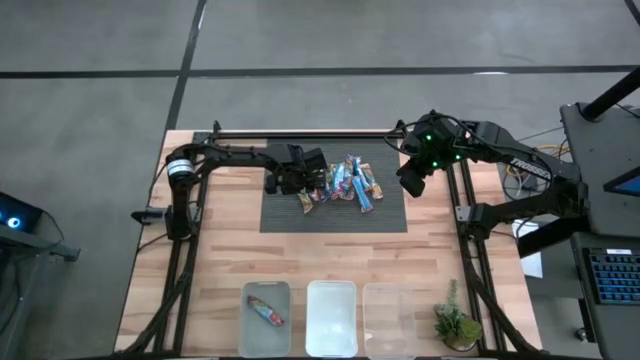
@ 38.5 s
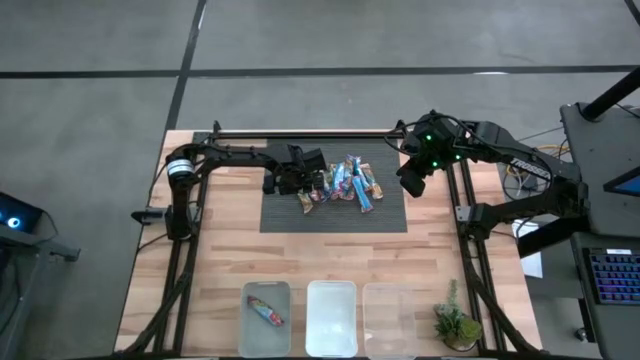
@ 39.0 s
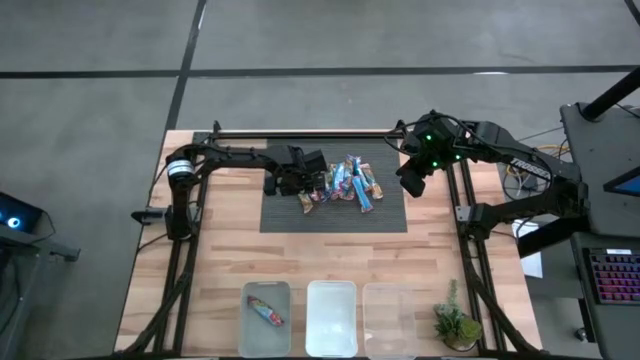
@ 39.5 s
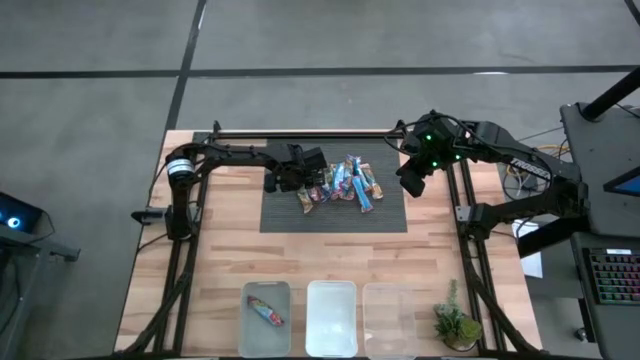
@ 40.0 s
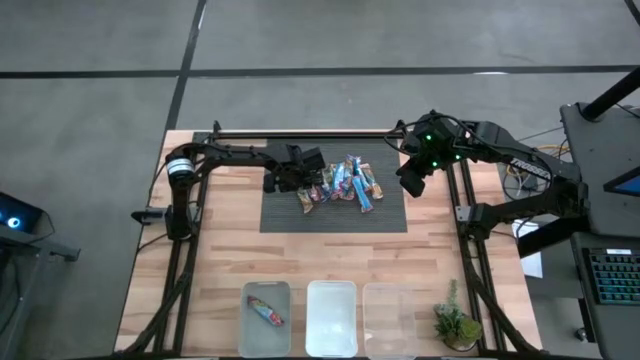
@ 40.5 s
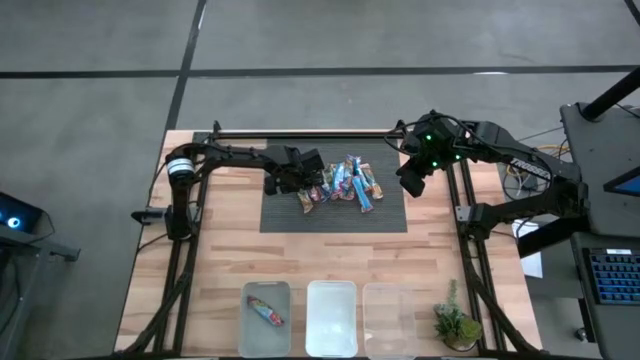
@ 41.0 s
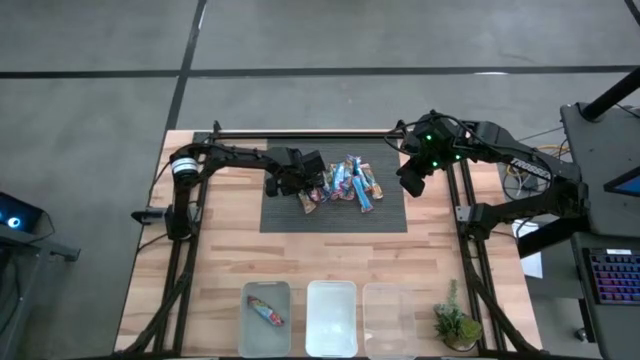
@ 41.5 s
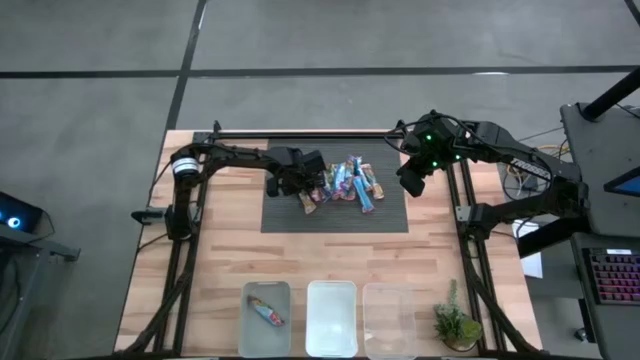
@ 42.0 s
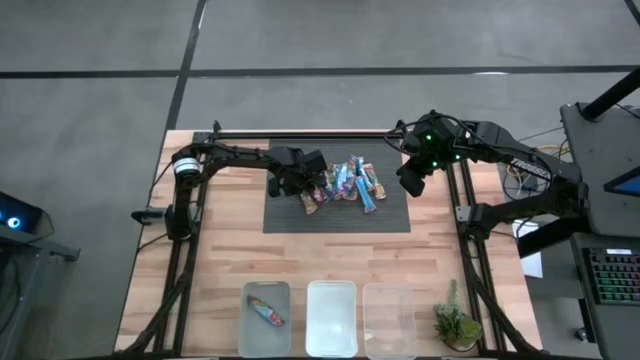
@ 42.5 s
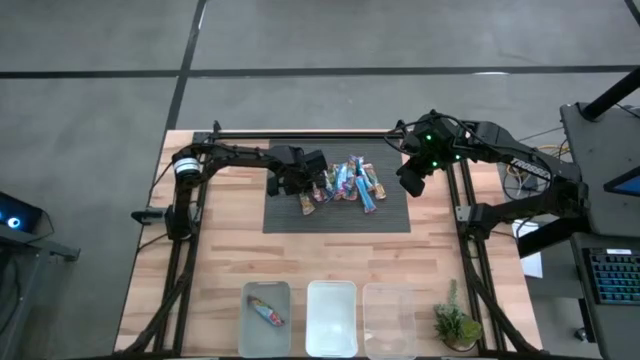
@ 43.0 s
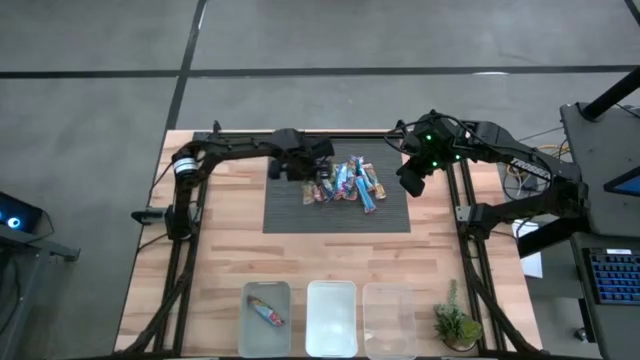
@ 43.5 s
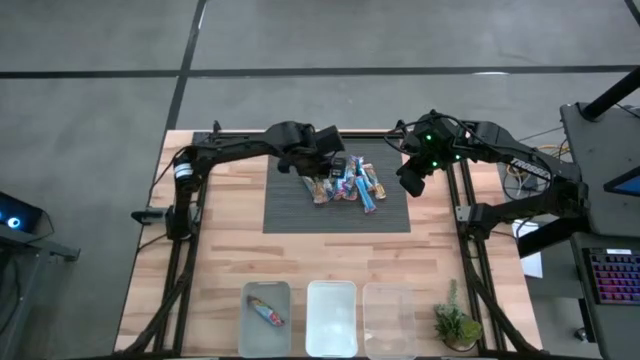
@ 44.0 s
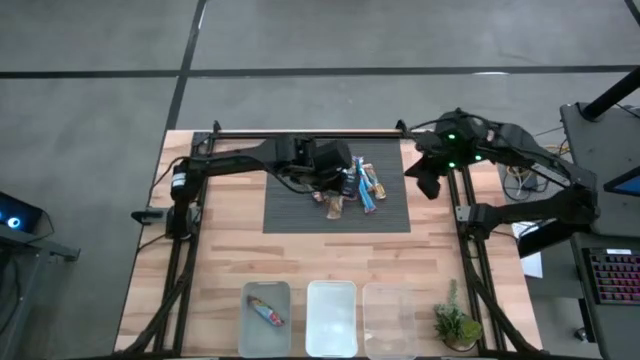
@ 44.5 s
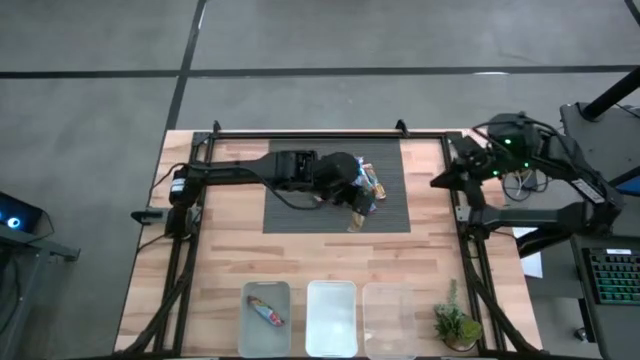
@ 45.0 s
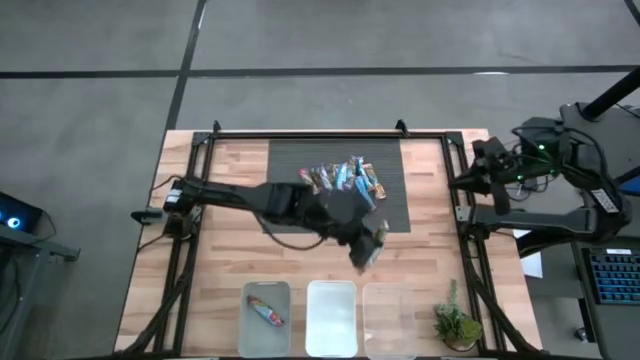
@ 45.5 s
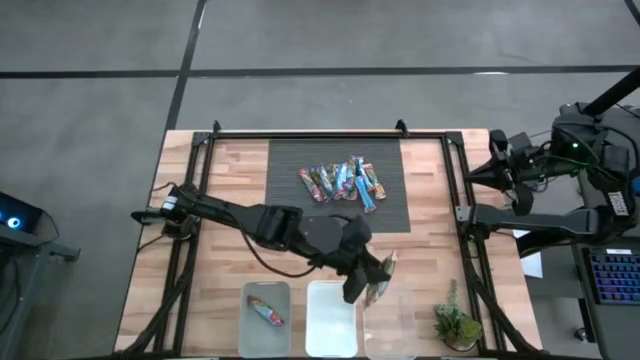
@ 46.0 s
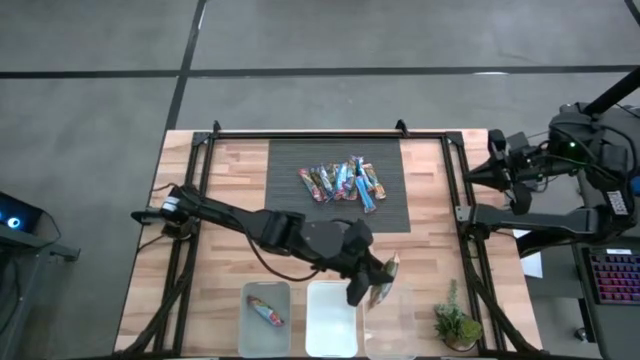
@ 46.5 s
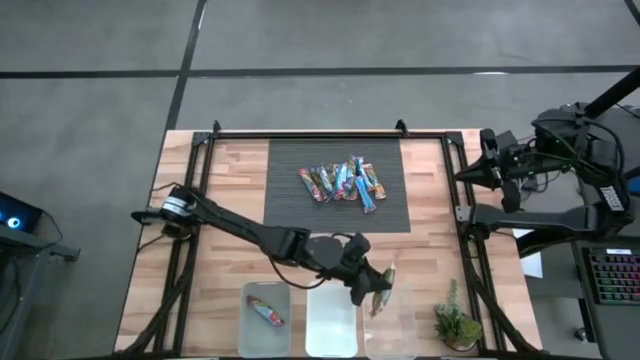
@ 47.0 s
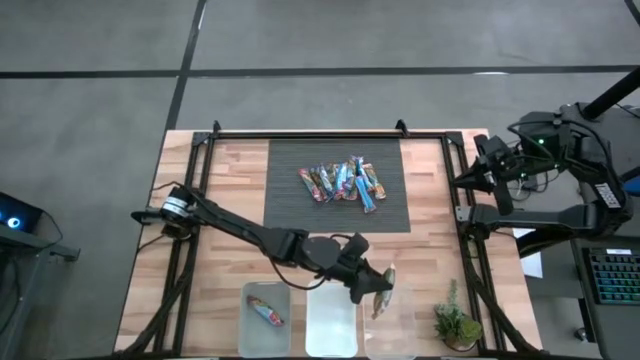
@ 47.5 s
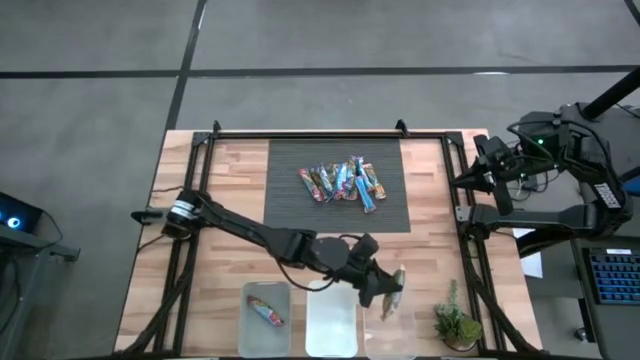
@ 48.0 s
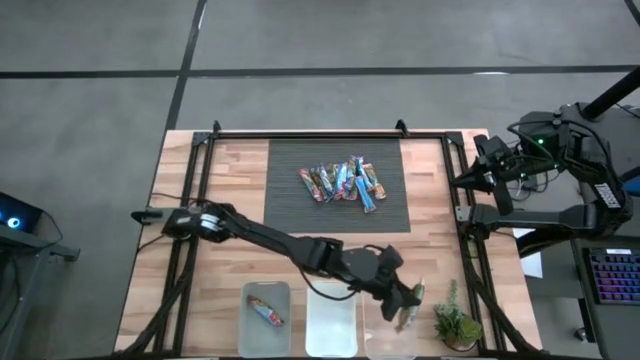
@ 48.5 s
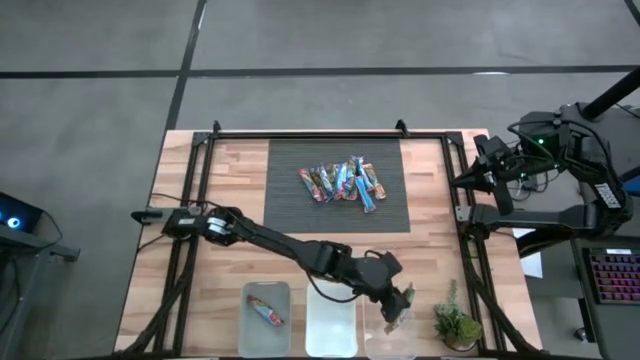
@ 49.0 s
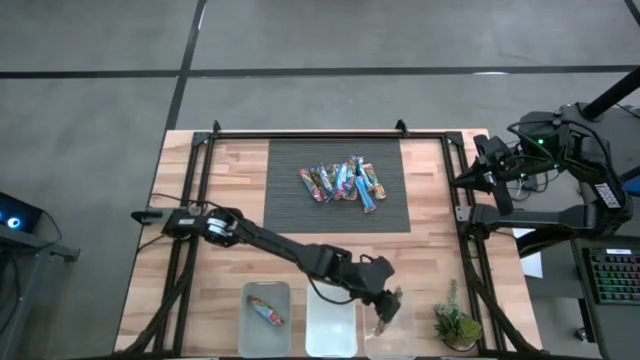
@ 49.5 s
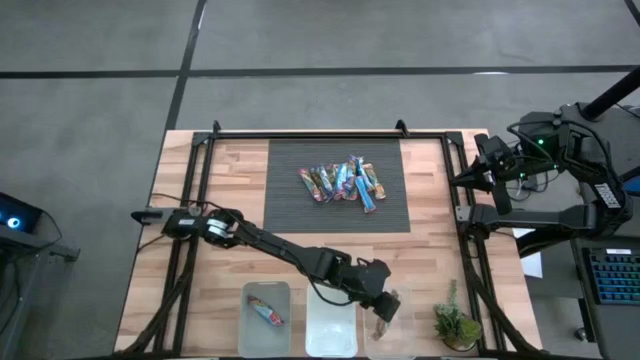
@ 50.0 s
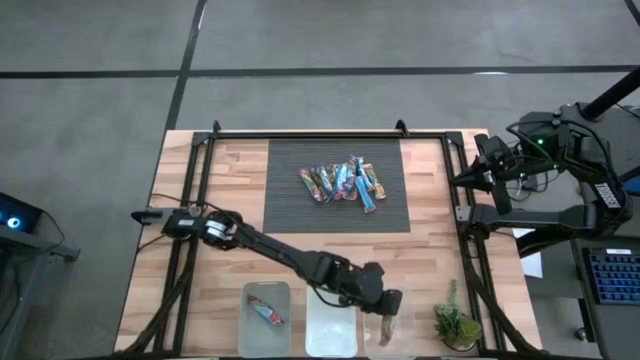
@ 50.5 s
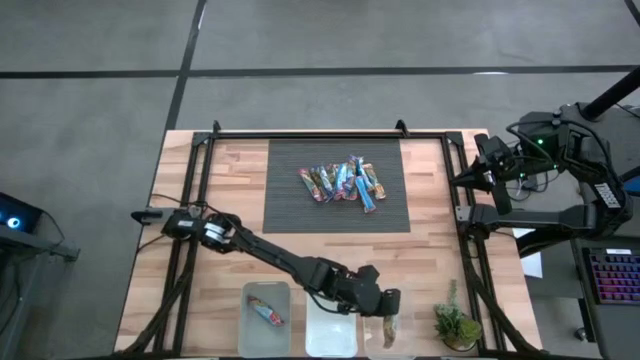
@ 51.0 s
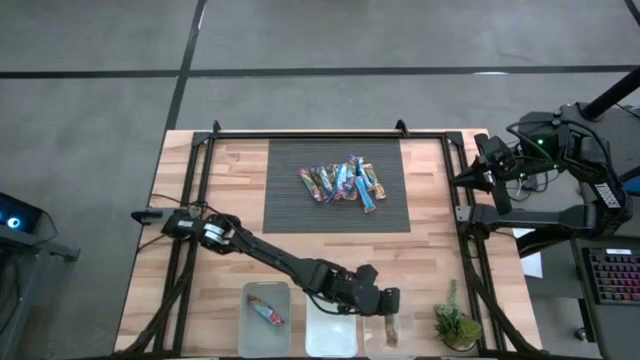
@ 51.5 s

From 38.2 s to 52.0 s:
Task: Pick and place Granola Bars by type
Put the yellow granola bar into the transparent bin

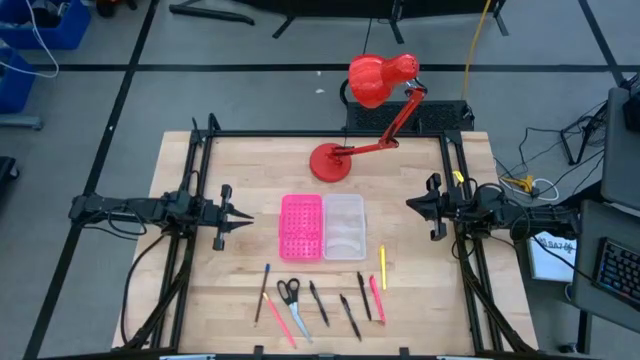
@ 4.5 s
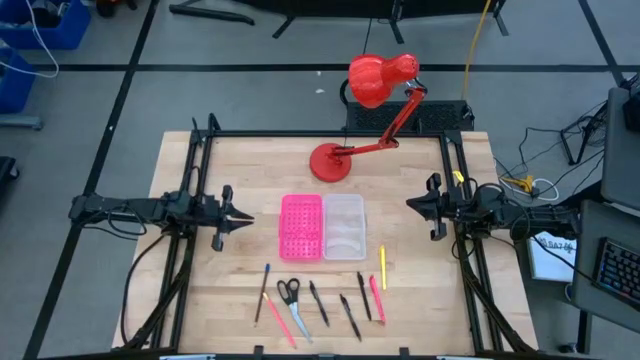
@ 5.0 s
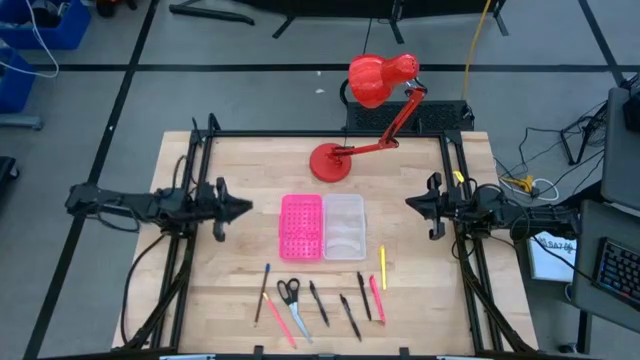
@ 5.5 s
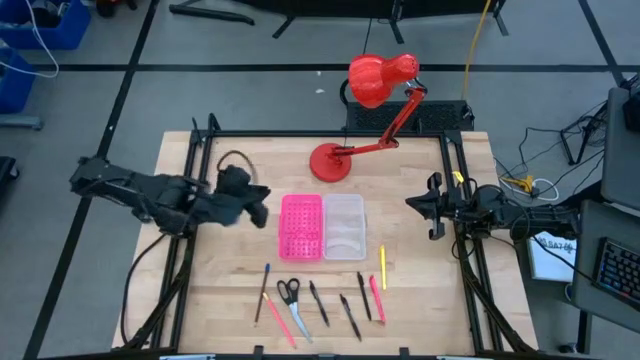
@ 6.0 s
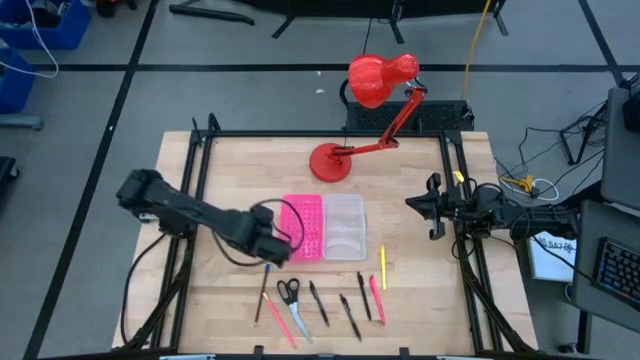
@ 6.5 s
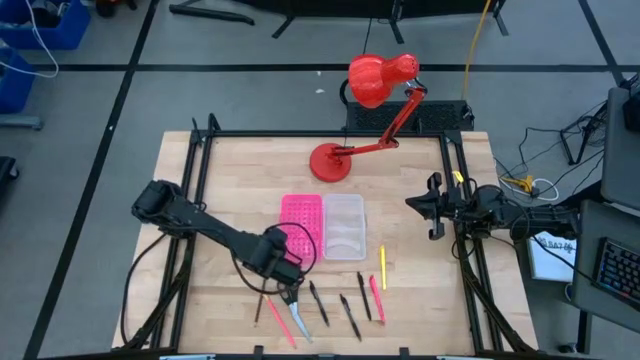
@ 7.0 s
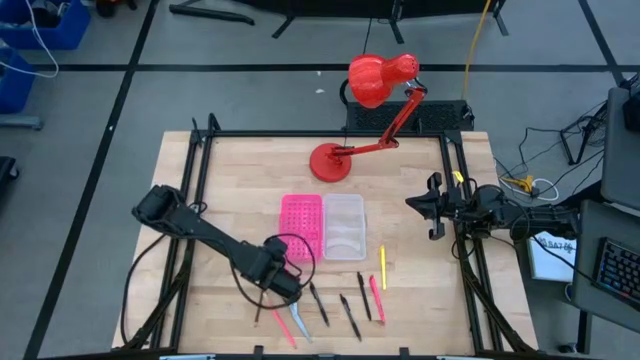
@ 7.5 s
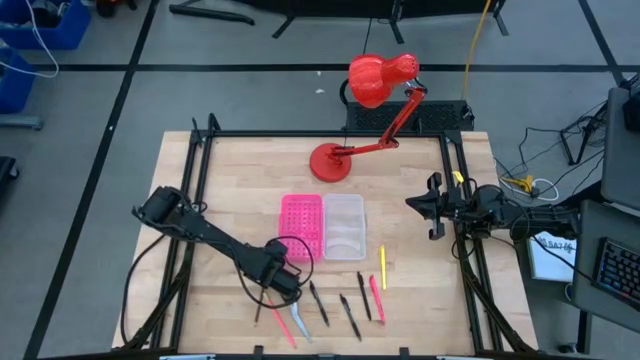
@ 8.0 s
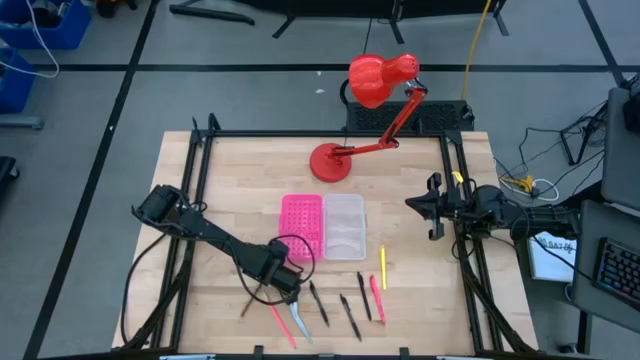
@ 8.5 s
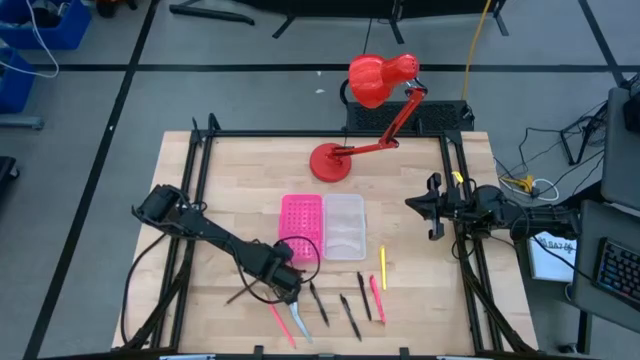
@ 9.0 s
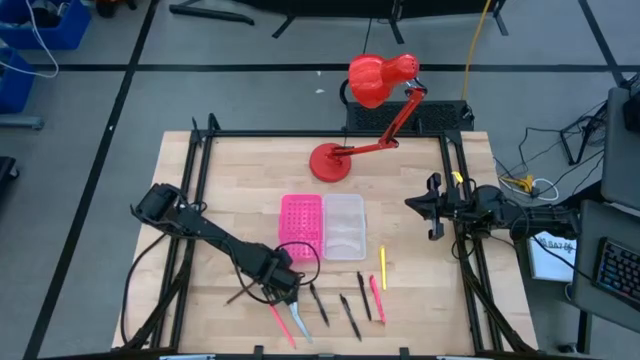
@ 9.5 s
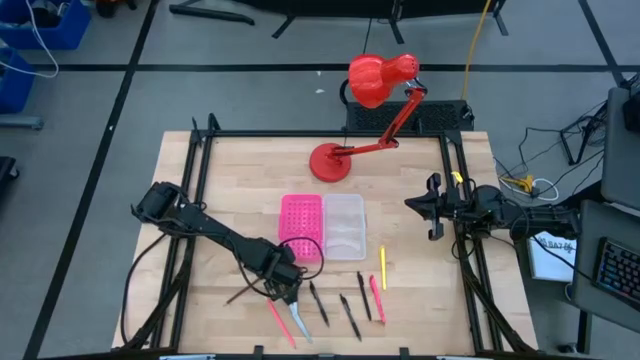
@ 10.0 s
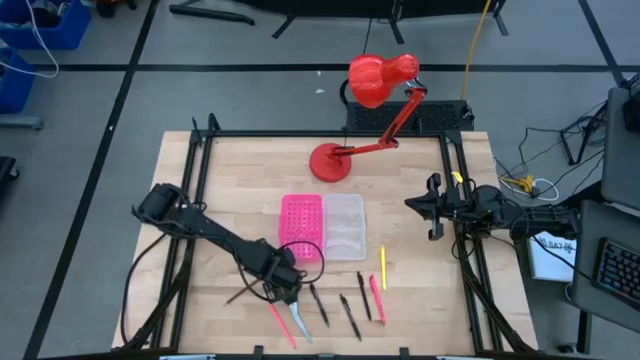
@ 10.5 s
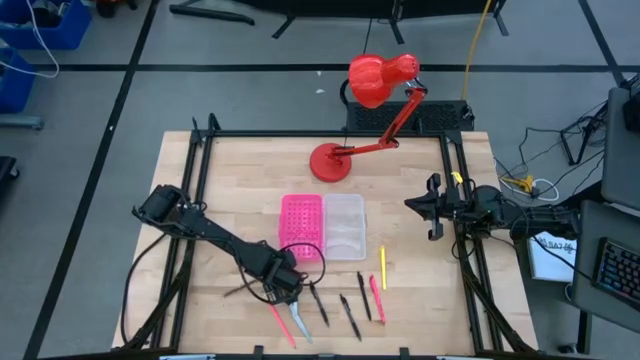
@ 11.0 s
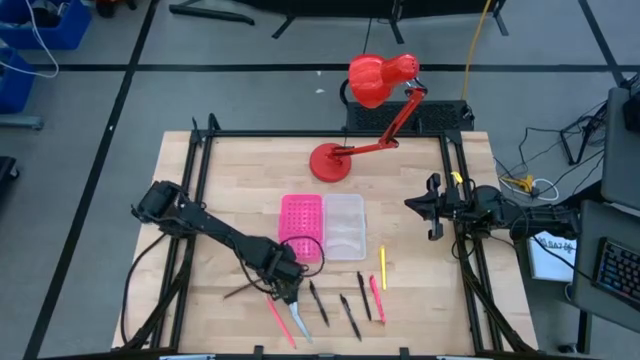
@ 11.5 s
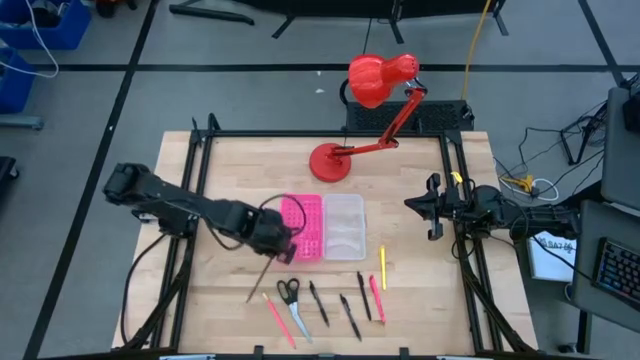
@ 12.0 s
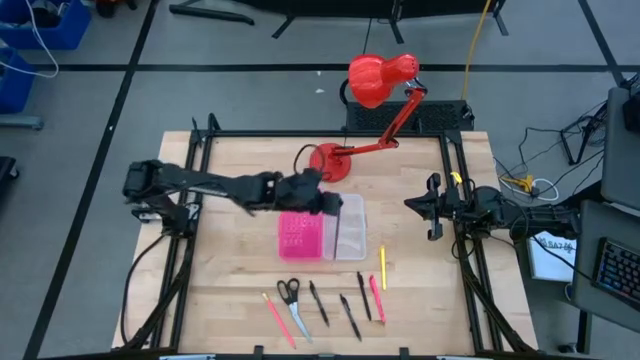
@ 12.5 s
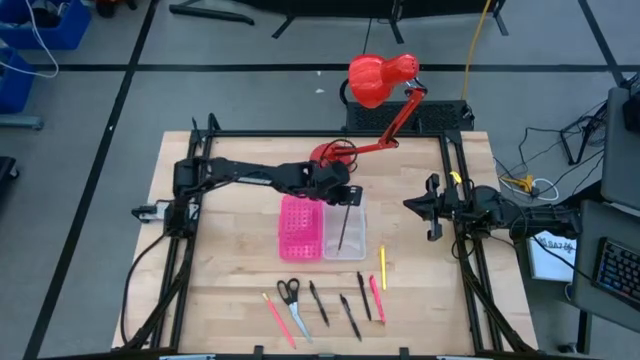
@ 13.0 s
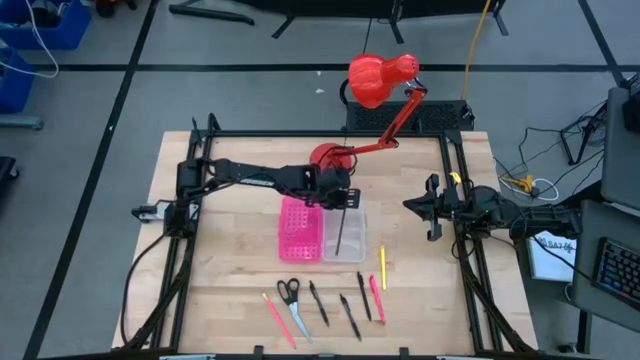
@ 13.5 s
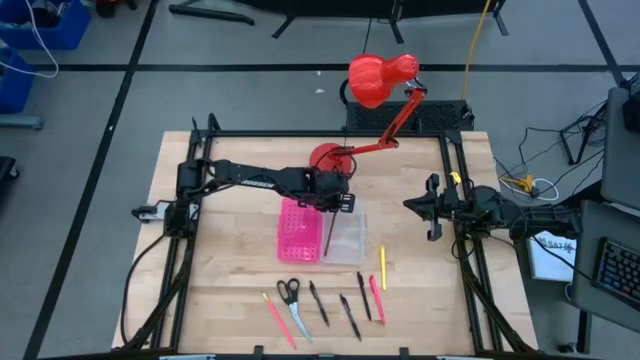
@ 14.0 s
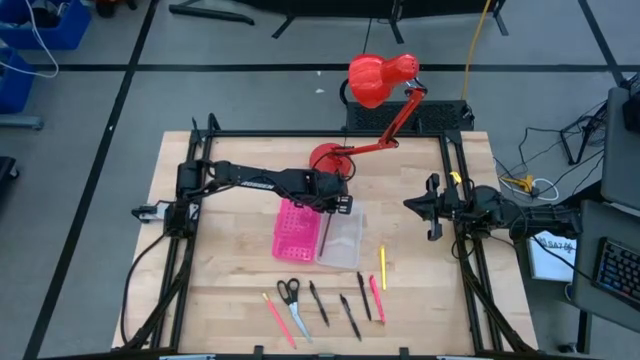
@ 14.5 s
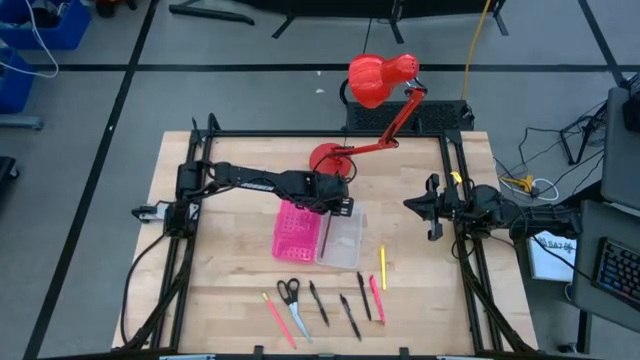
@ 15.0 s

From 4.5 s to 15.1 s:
Task: Pick & place school supplies into a supply box
Put the brown pencil into the pink supply box
